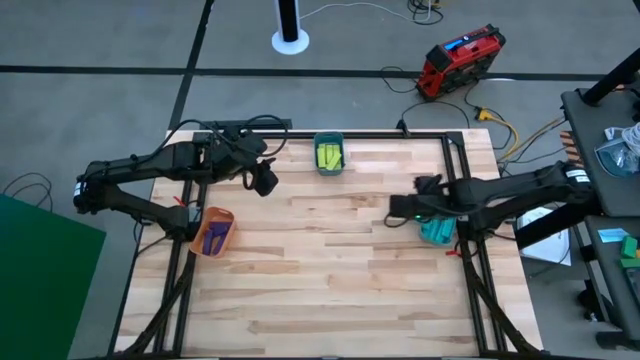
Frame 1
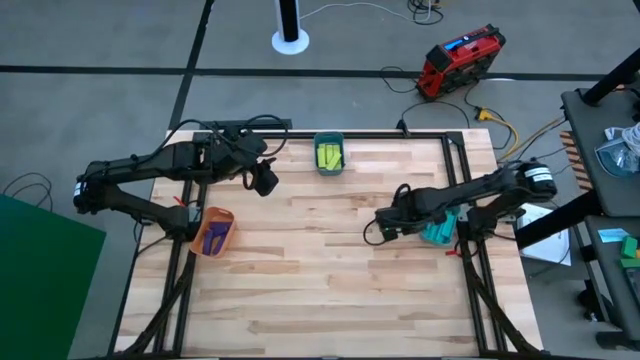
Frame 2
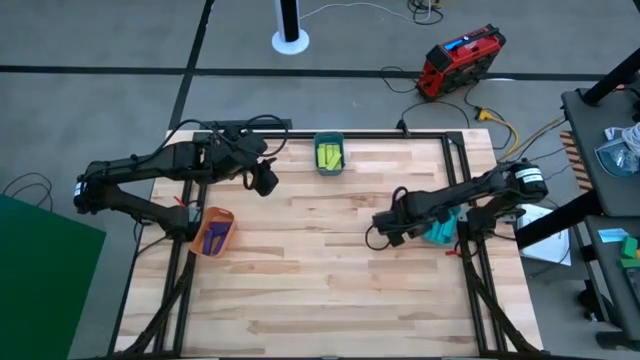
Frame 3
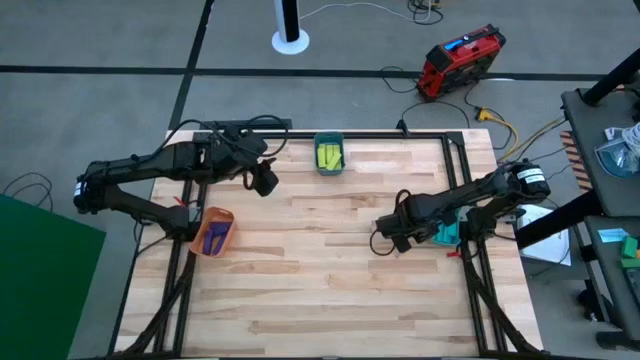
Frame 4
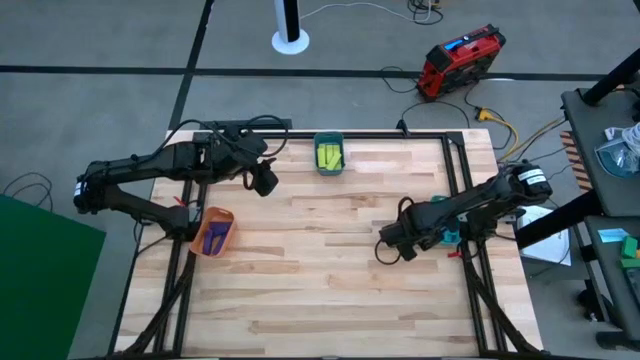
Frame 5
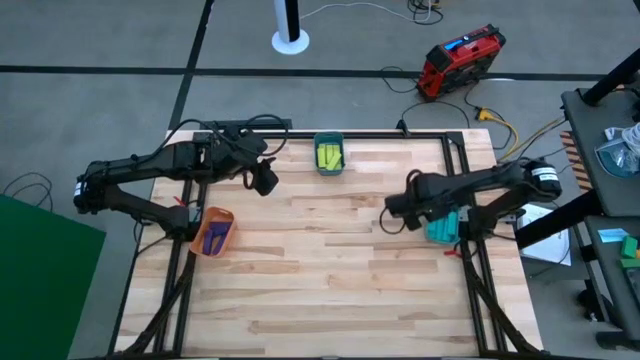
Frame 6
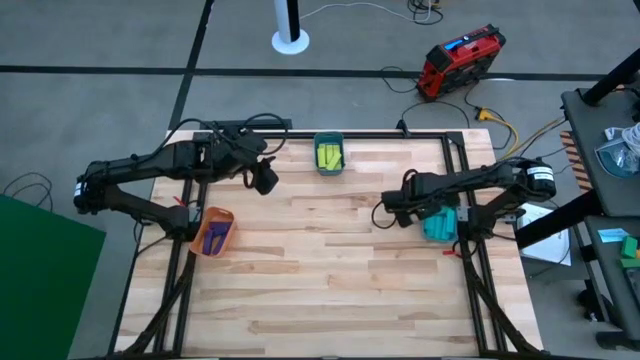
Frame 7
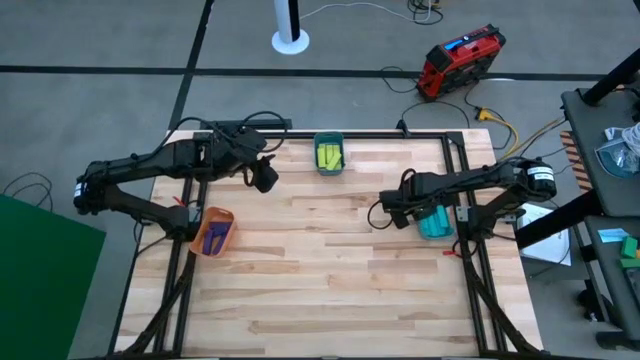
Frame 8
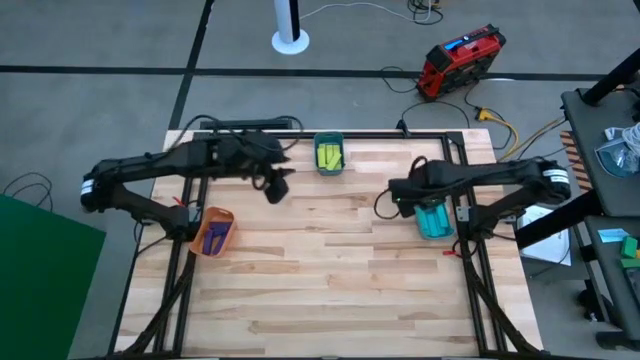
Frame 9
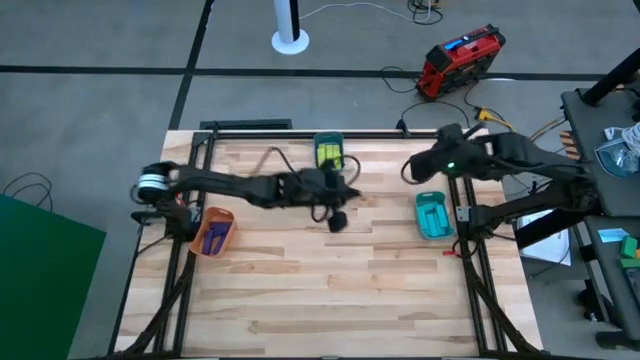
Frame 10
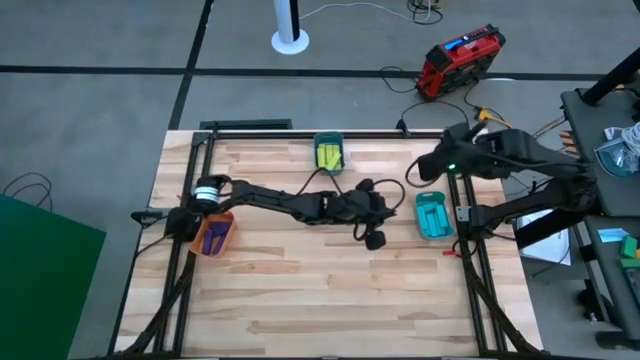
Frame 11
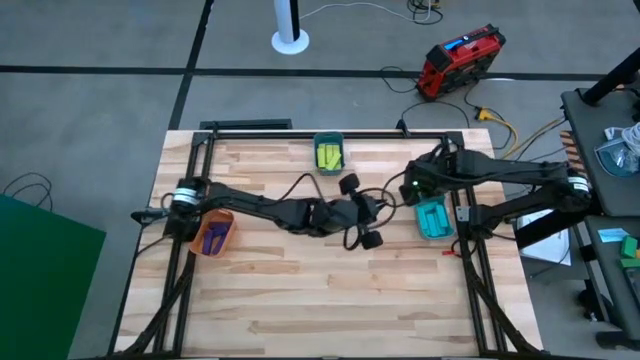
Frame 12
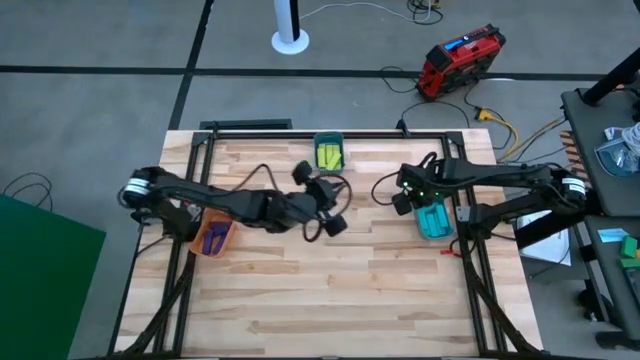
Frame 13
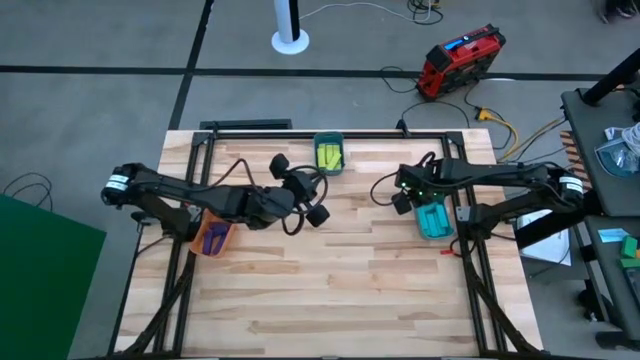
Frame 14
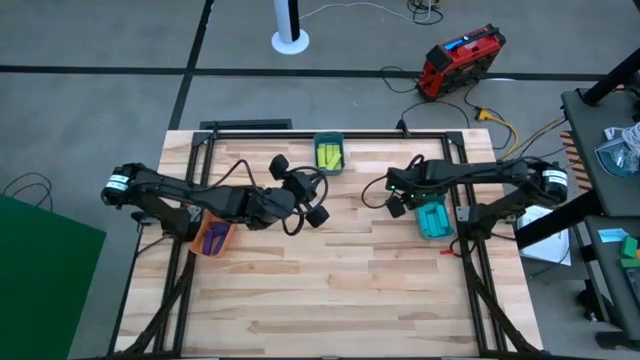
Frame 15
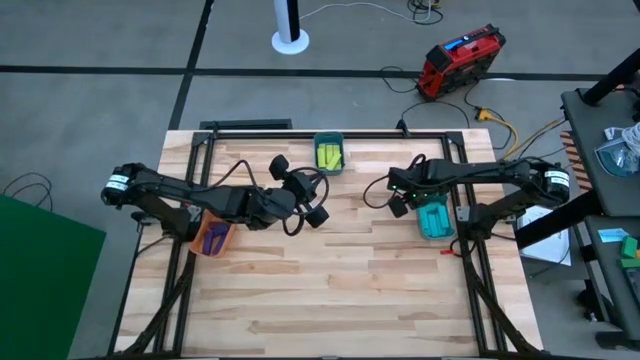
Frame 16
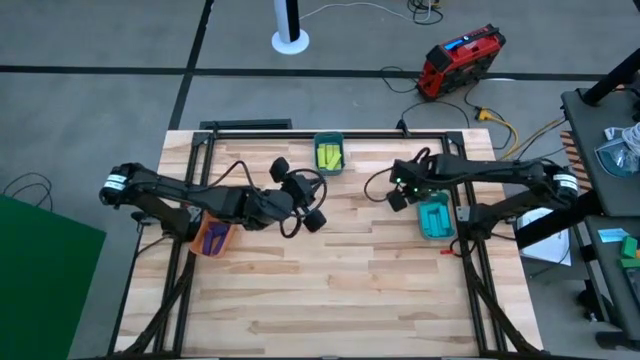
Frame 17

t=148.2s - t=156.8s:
Task: Sort blocks
Adjust the light blue bin on the table

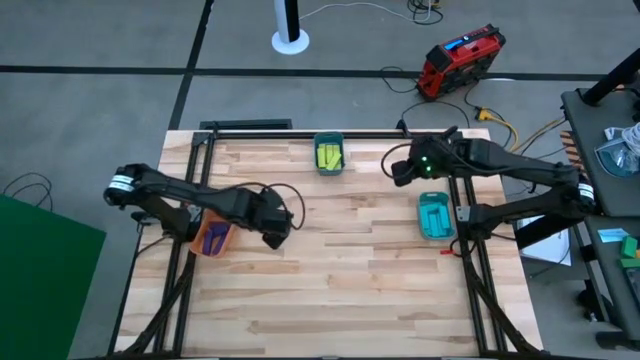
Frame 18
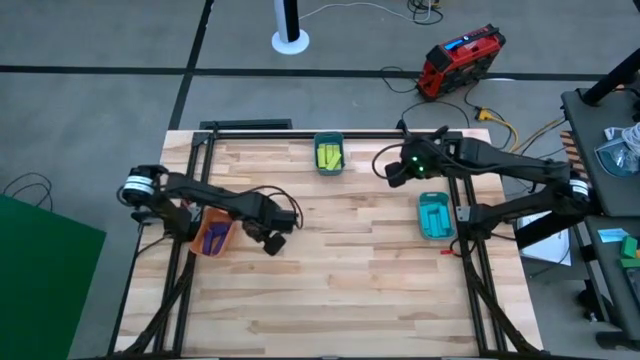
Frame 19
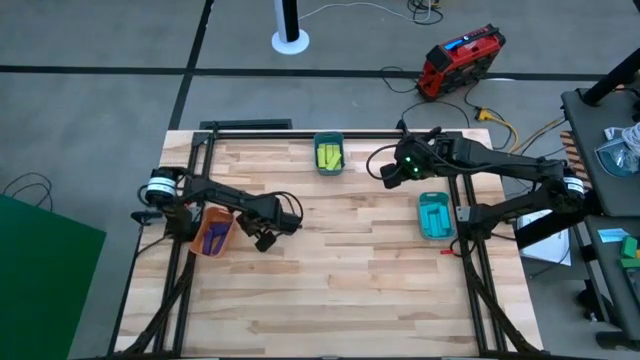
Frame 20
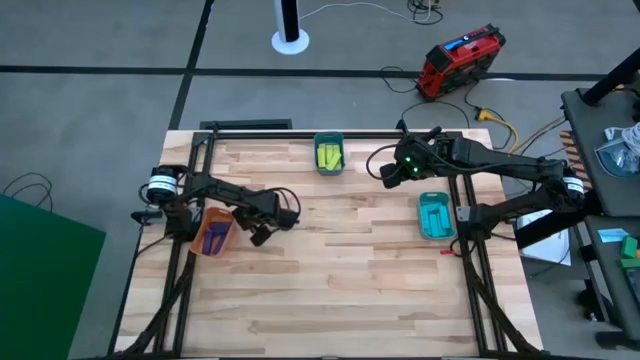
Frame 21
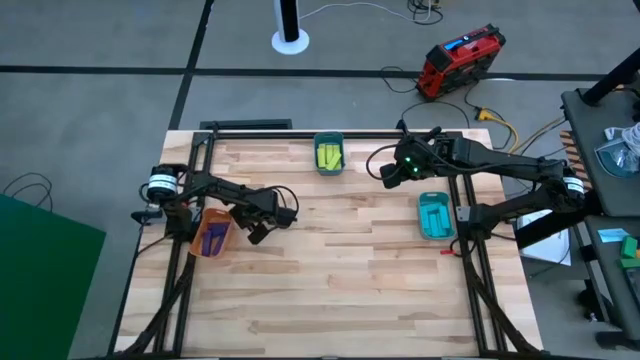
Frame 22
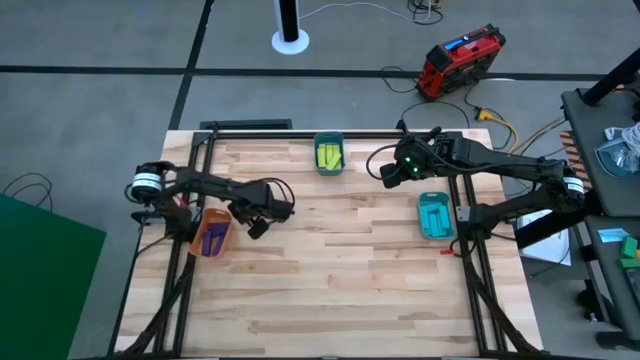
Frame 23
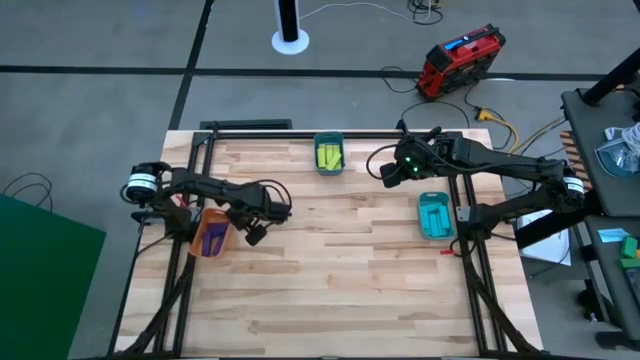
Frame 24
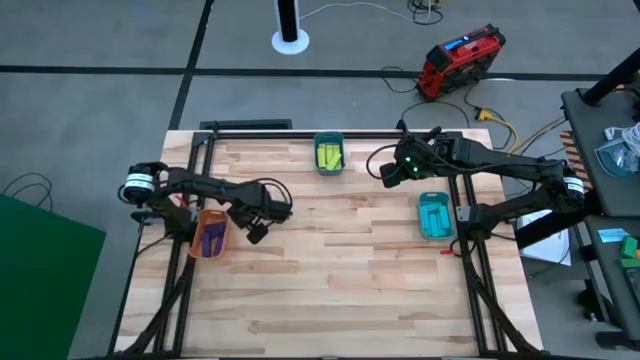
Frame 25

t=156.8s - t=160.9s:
Adjust the orange bin on the table

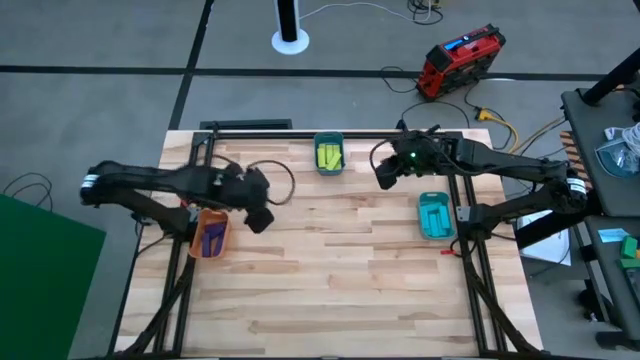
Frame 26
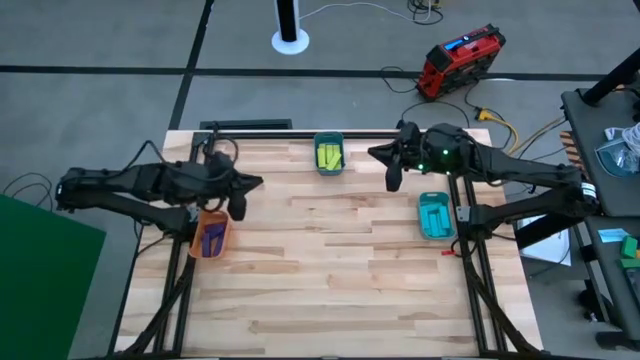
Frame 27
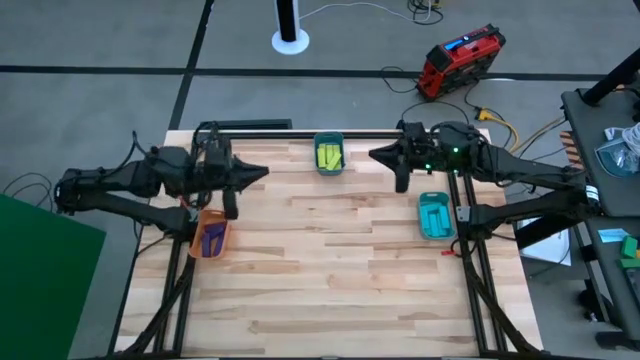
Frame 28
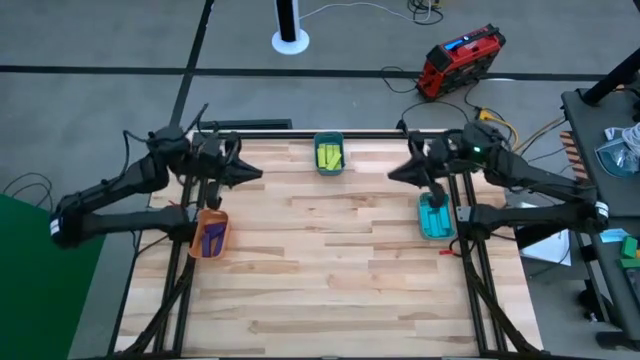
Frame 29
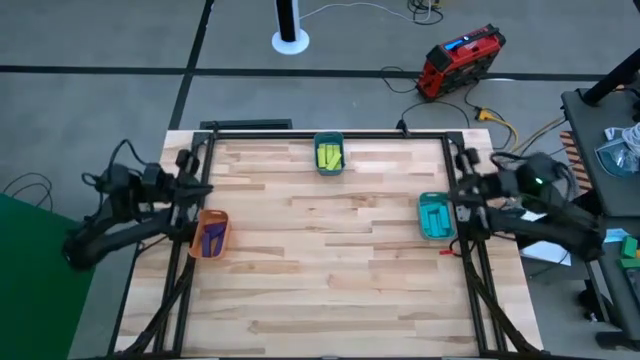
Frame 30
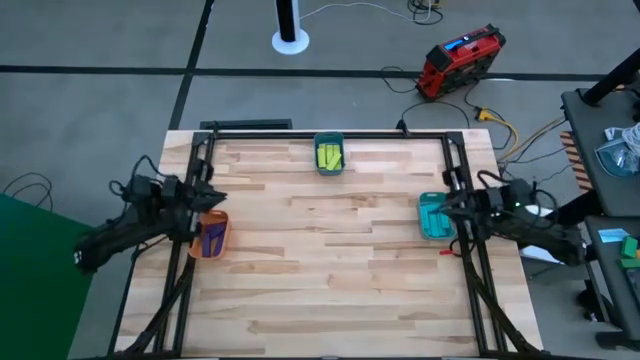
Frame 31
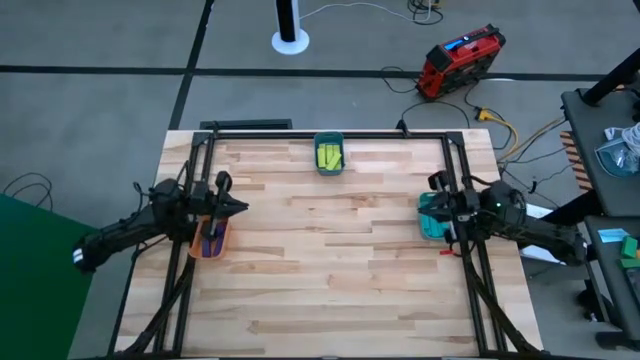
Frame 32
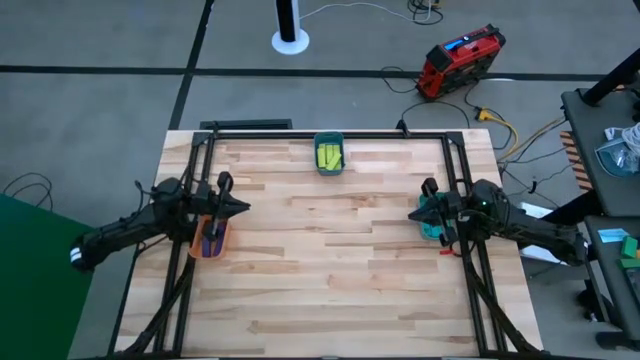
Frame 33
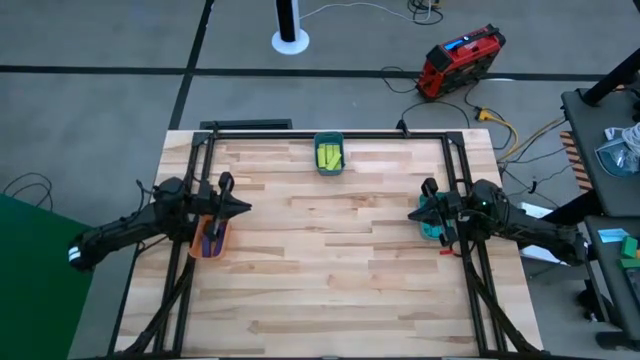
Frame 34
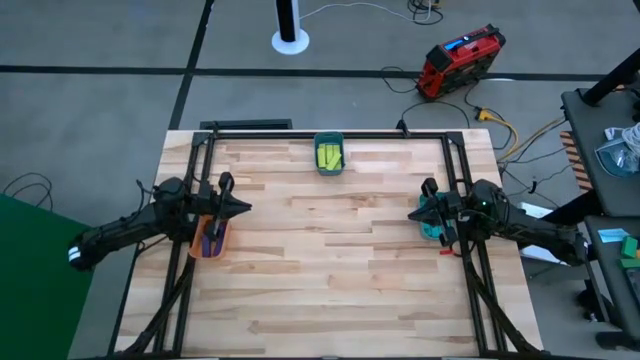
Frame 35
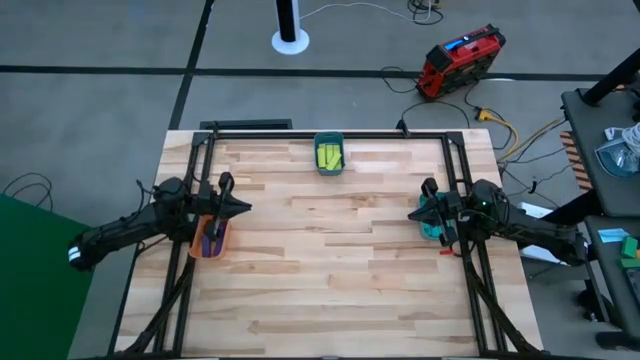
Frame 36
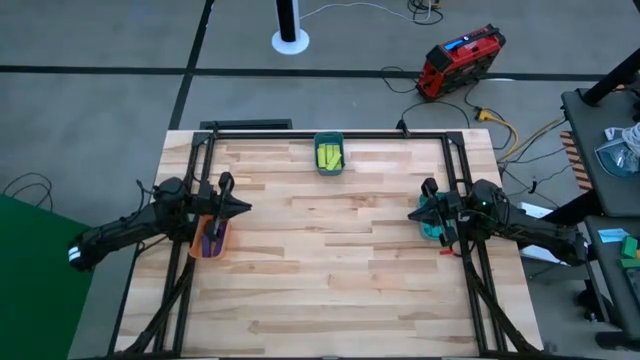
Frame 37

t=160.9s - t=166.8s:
Return to Home Position

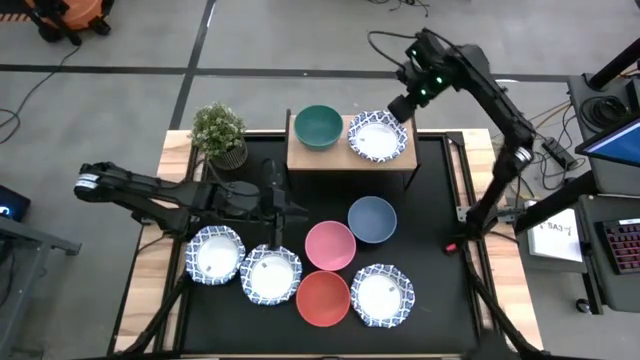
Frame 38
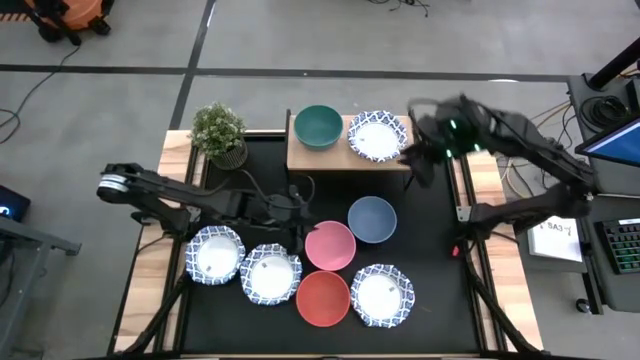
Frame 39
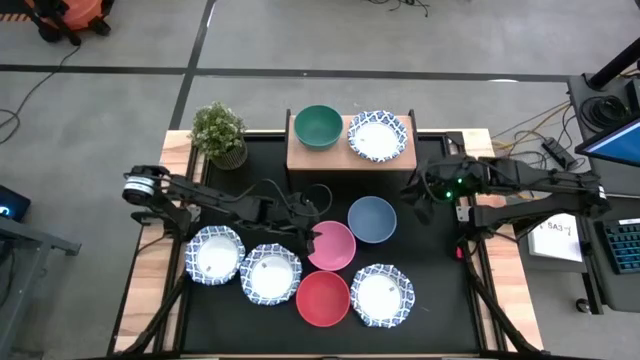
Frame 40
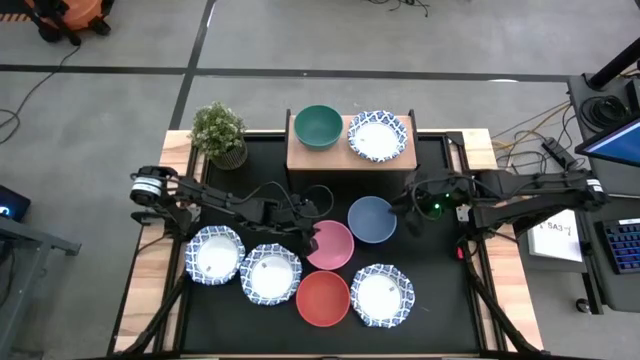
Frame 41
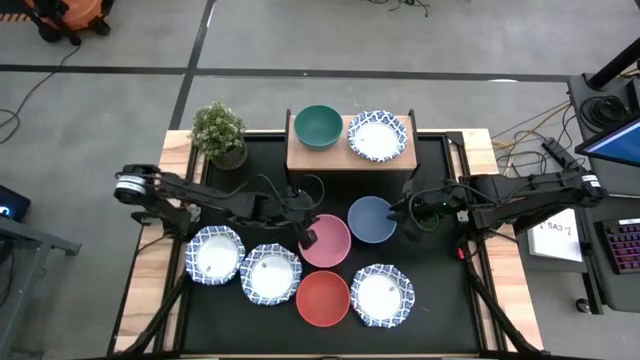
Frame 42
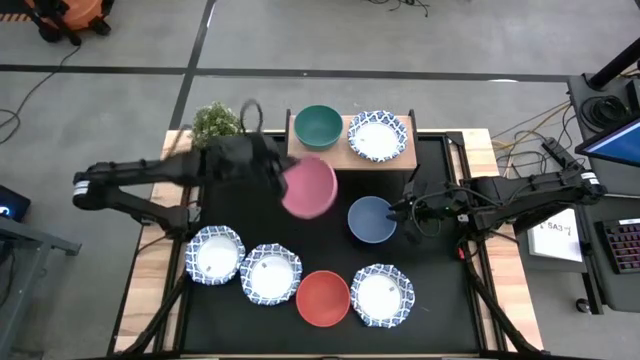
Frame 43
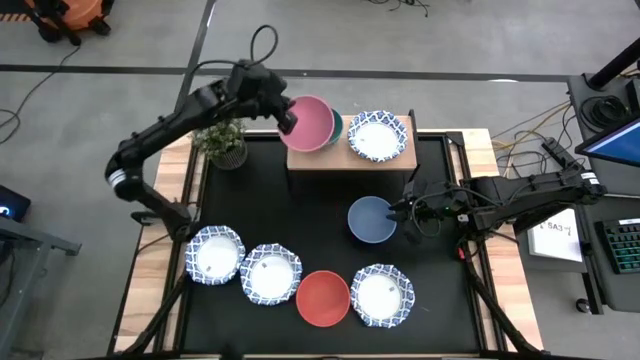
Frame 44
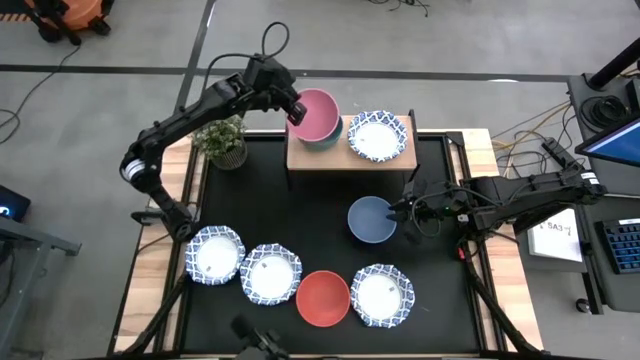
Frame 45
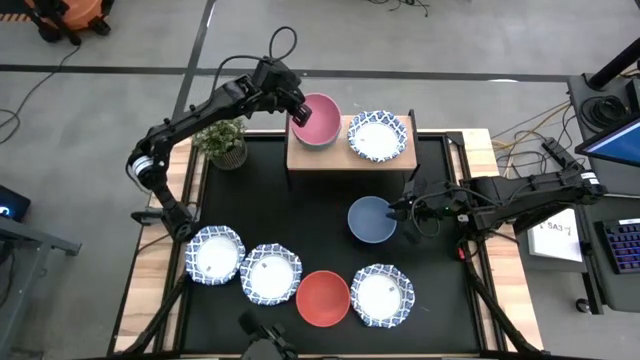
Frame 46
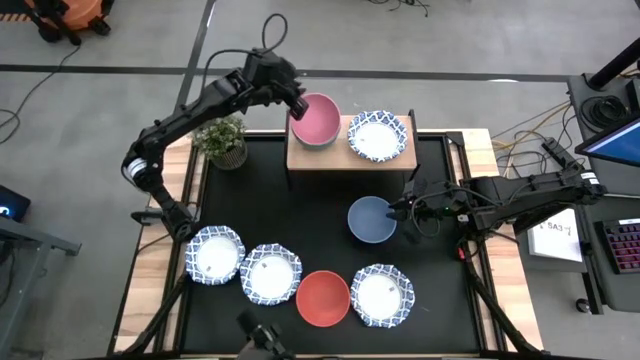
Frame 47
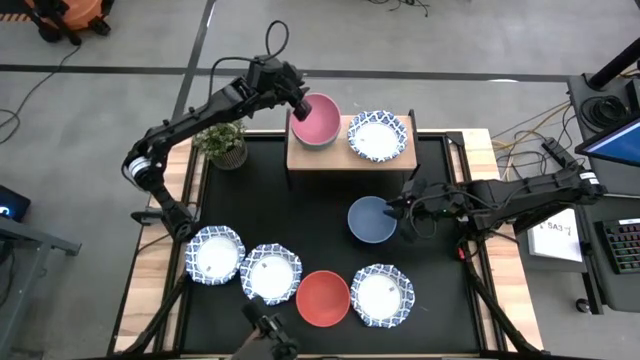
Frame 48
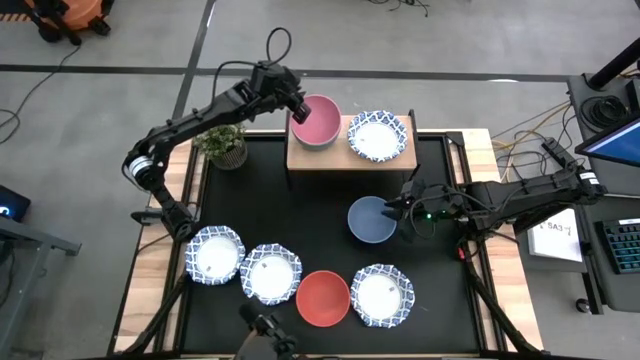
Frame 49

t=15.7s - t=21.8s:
Task: Place and stack bowls onto a shelf
Stack the pink plastic bowl on the green plastic bowl on the shelf
